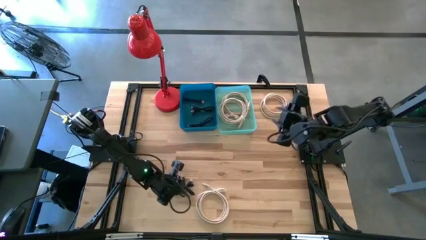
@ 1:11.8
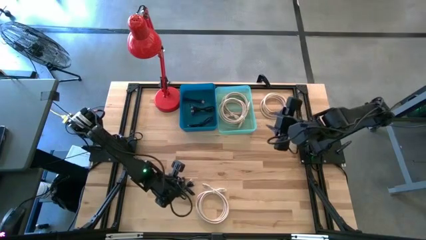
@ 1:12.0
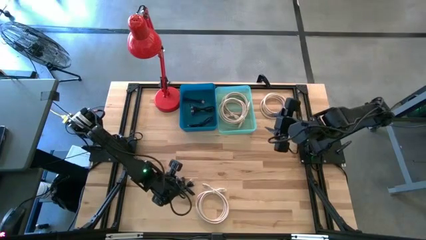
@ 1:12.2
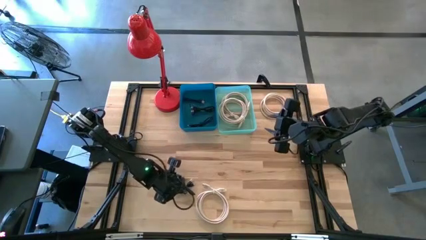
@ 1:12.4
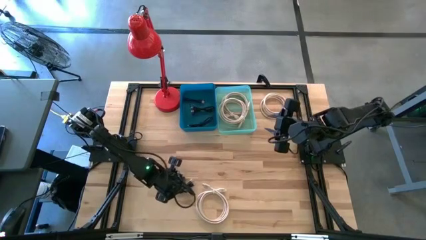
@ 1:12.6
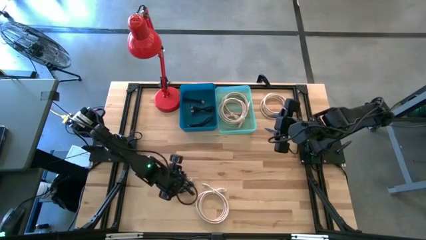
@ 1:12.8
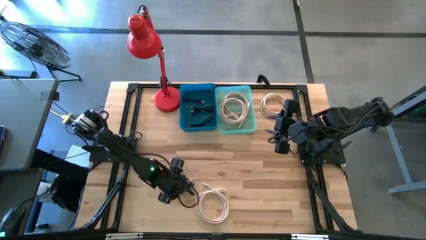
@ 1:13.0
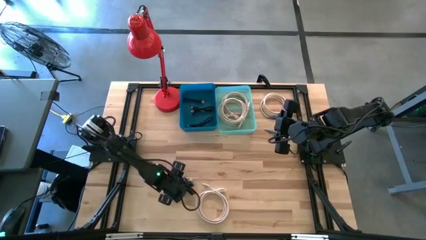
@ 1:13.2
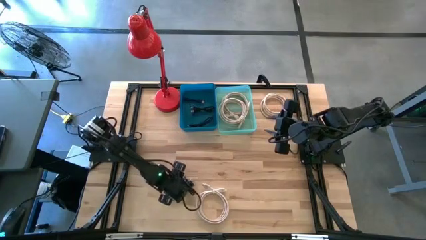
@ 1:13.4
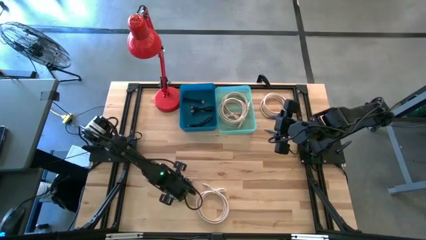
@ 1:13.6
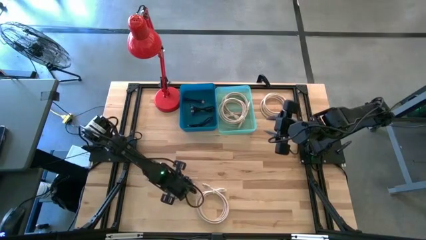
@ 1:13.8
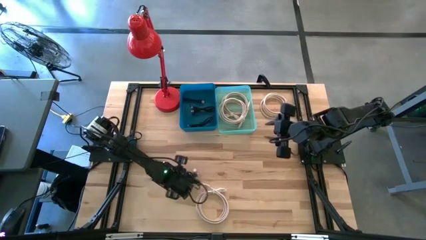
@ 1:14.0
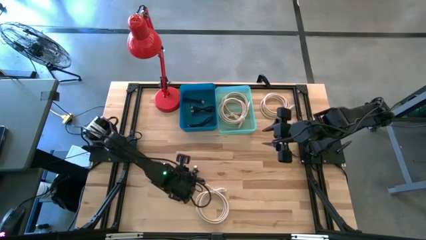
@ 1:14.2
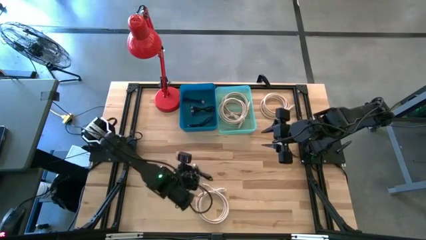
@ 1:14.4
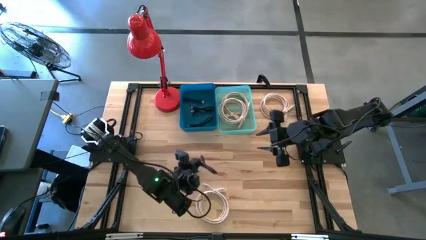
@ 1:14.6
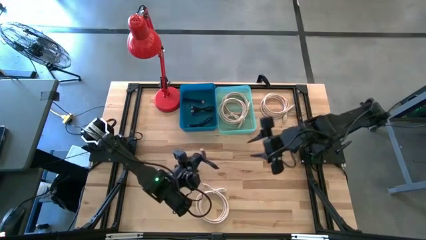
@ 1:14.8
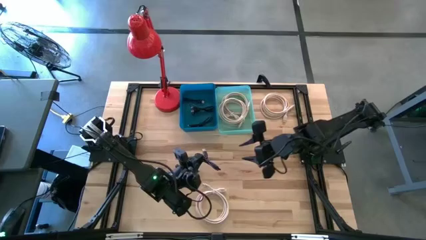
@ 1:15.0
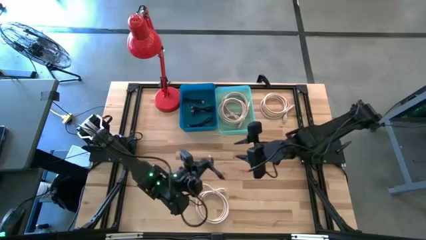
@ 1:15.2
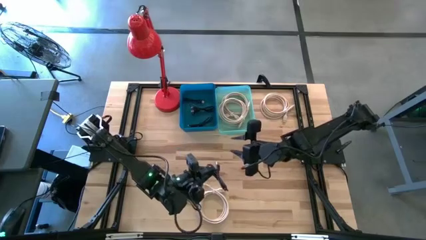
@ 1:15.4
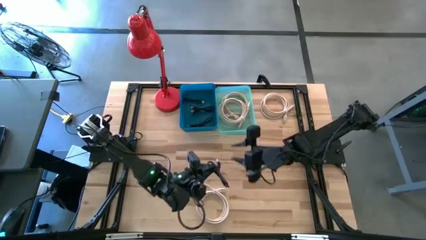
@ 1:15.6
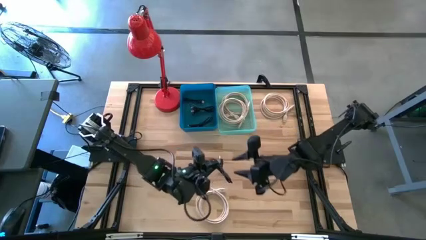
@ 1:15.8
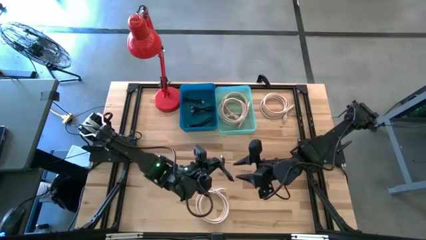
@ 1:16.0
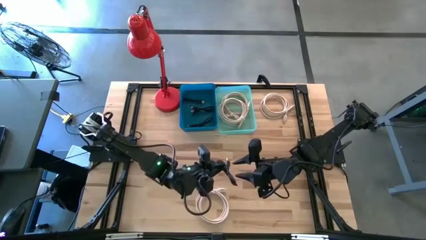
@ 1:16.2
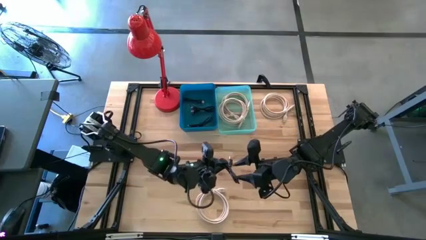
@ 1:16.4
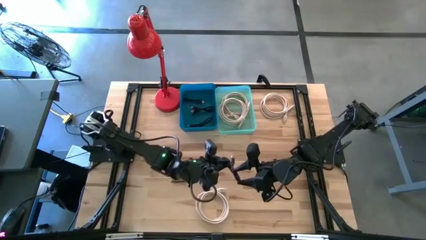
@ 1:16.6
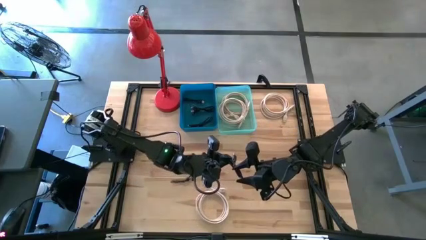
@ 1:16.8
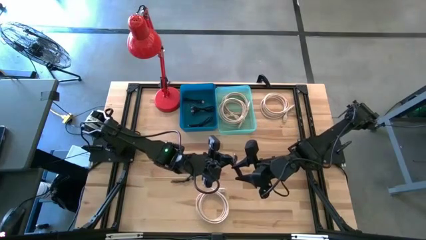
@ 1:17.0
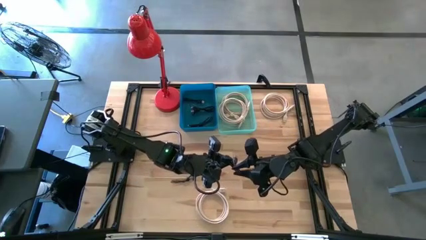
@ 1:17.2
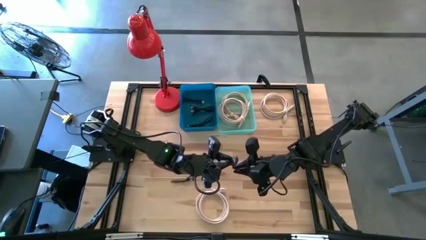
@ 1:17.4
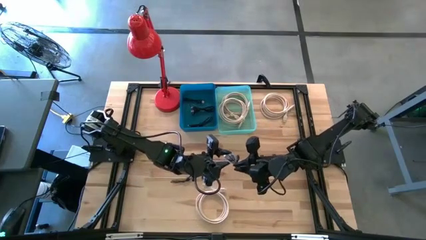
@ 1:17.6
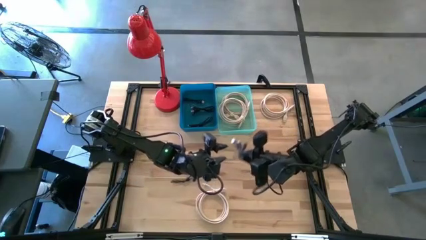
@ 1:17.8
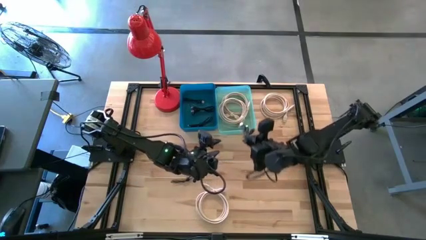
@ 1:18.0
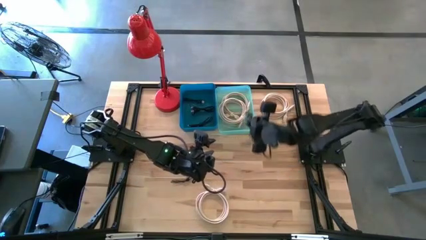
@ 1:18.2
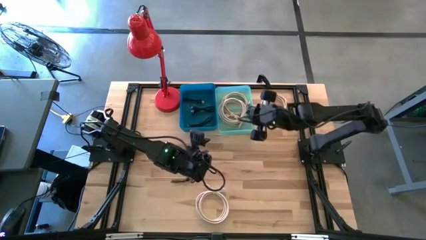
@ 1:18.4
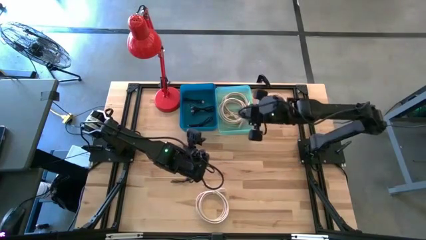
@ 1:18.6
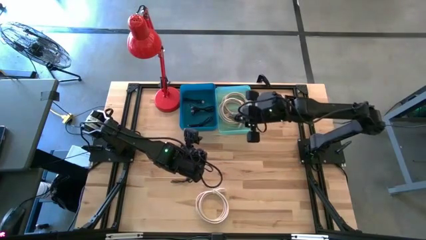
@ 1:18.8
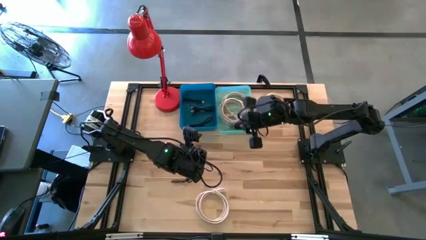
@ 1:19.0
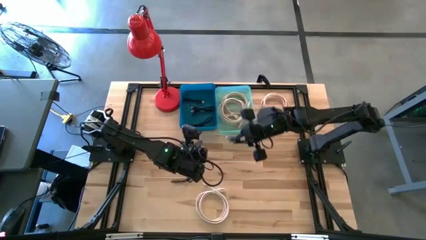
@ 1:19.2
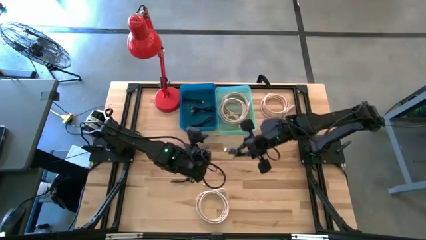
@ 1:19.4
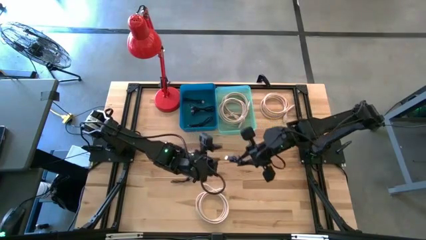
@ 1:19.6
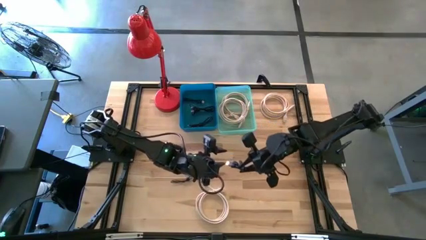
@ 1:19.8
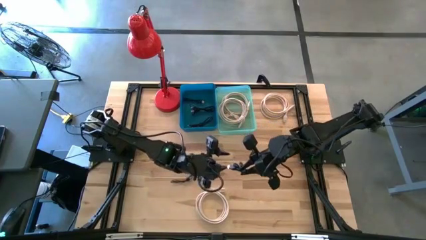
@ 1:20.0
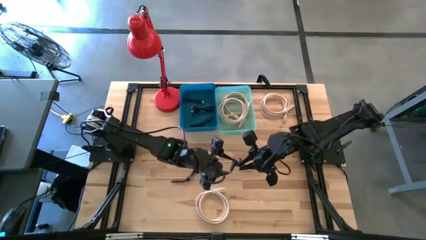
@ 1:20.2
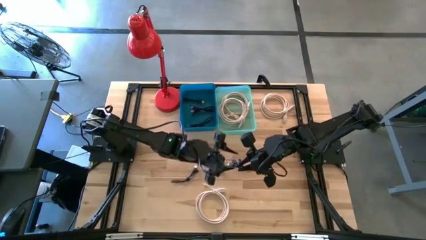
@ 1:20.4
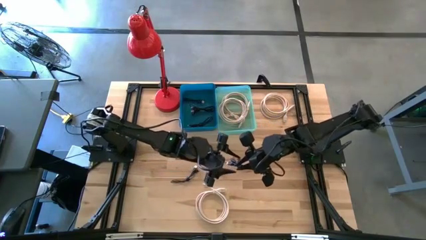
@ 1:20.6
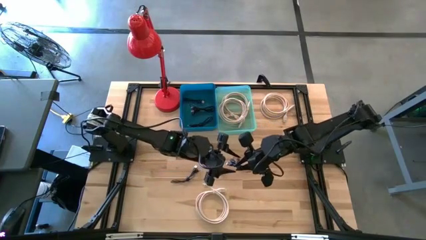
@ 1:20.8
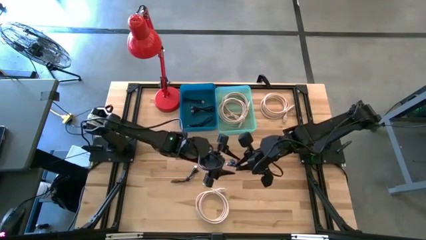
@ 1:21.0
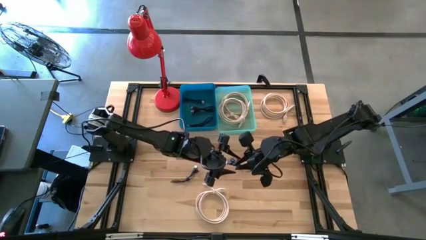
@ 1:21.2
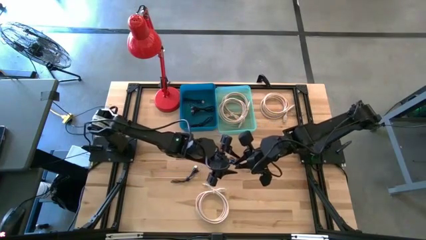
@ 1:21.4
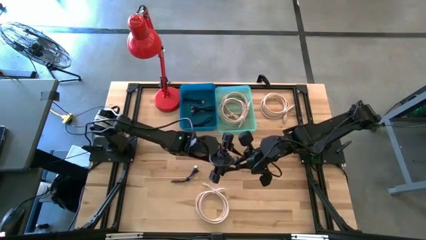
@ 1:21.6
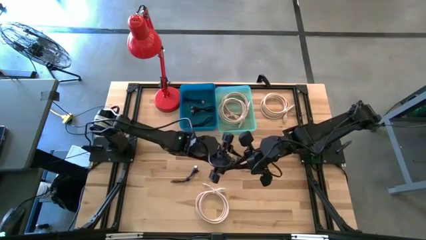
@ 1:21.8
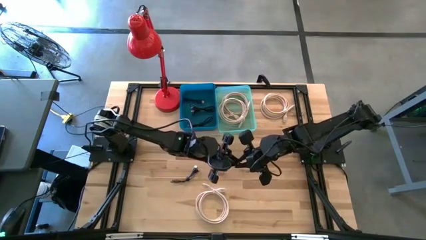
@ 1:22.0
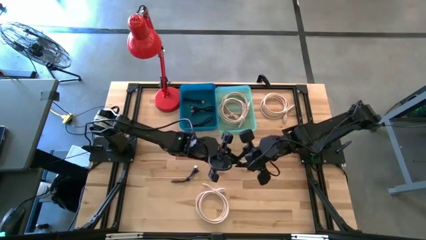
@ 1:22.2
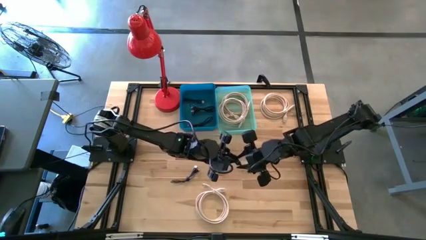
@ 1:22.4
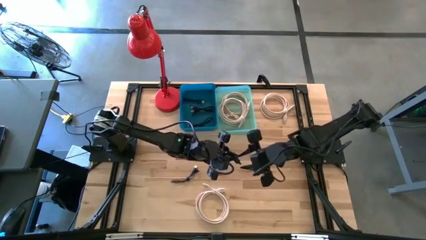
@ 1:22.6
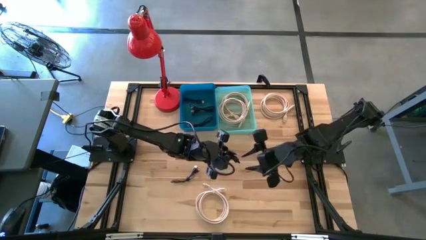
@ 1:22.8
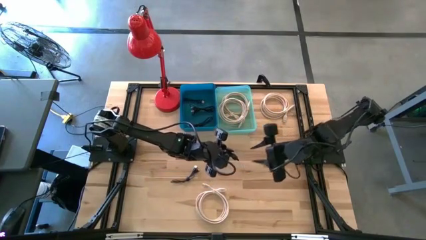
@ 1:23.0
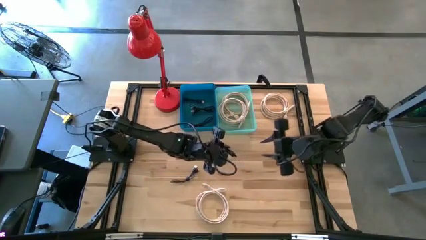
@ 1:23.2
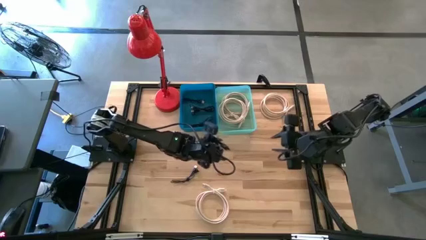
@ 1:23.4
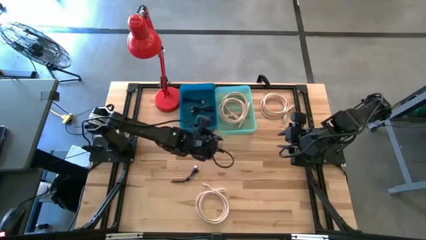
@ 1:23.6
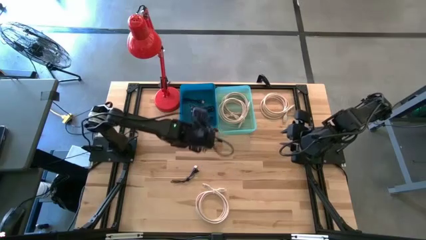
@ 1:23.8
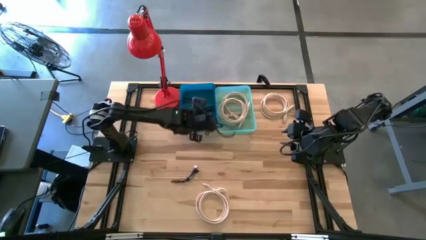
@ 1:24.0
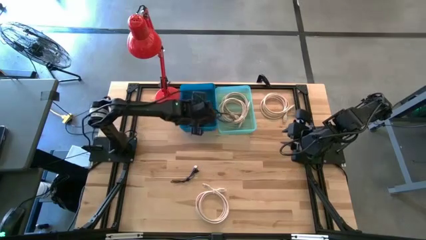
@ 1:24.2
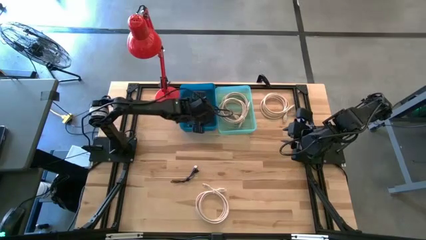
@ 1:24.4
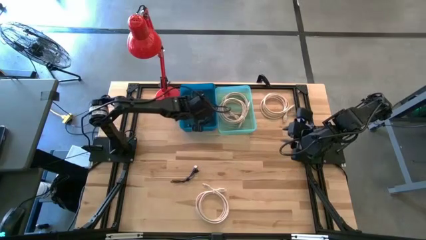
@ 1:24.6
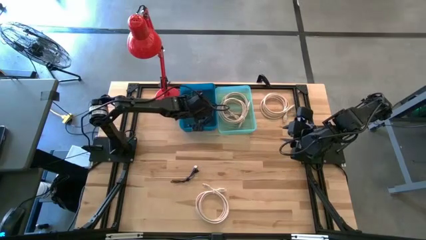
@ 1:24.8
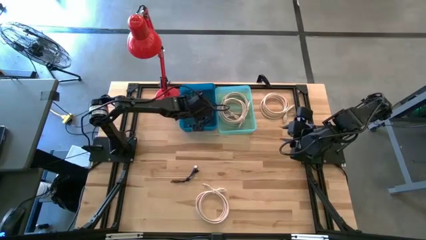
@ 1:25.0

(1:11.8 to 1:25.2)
Task: Pick & Place USB Port
Put the black USB cable into the blue bin

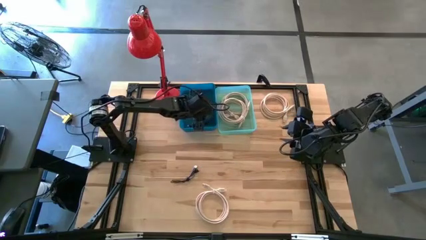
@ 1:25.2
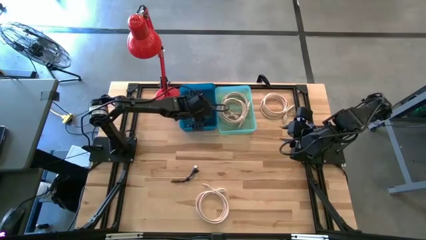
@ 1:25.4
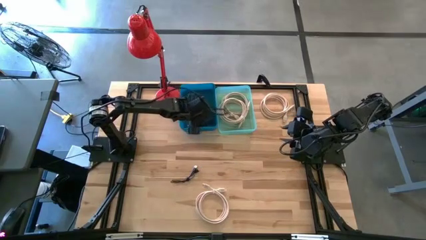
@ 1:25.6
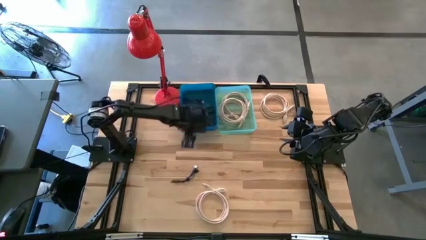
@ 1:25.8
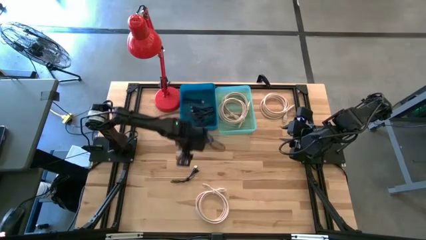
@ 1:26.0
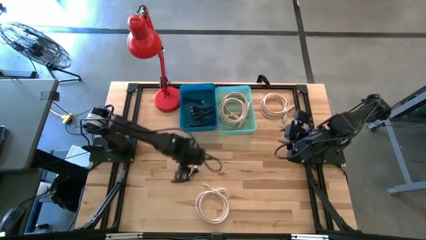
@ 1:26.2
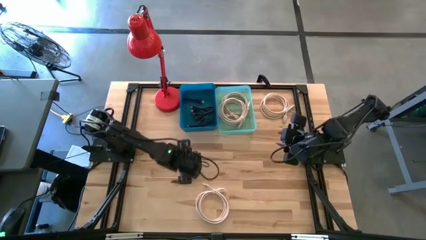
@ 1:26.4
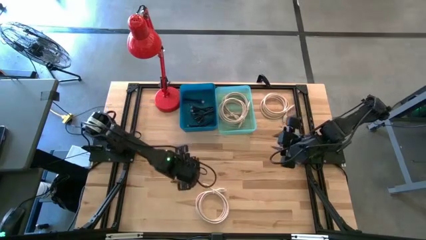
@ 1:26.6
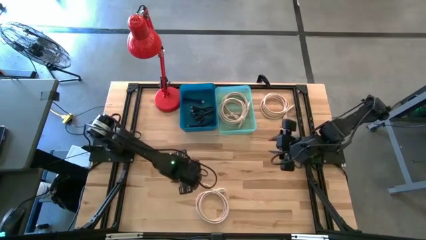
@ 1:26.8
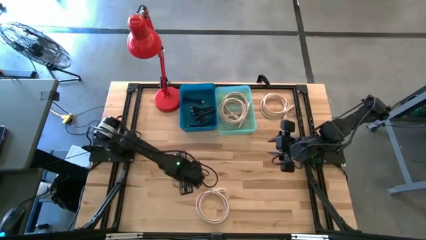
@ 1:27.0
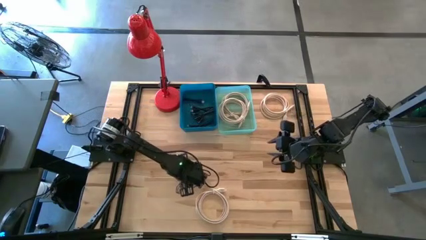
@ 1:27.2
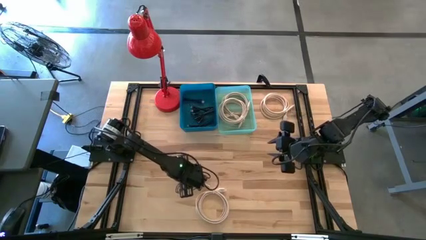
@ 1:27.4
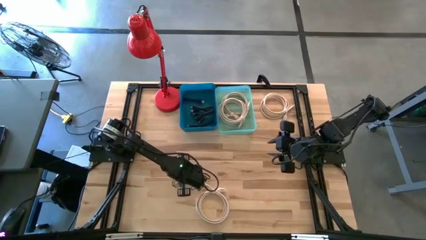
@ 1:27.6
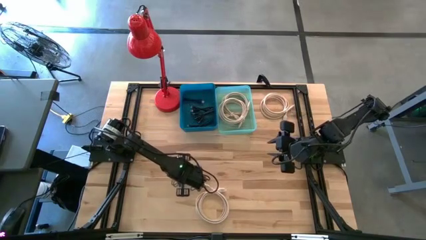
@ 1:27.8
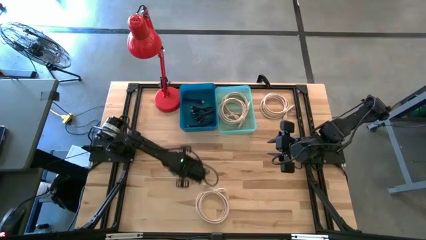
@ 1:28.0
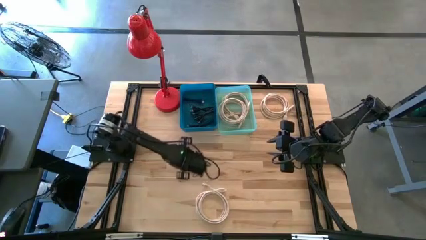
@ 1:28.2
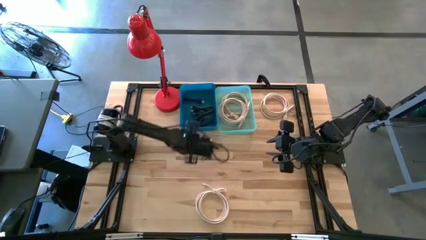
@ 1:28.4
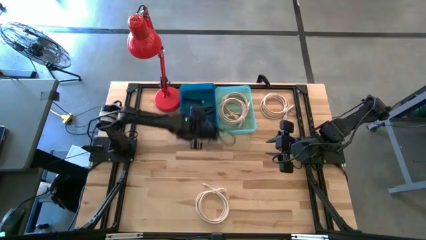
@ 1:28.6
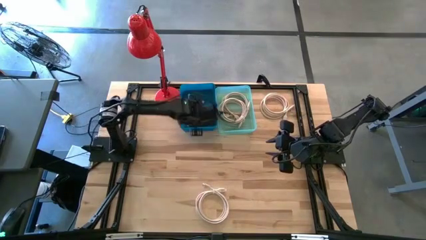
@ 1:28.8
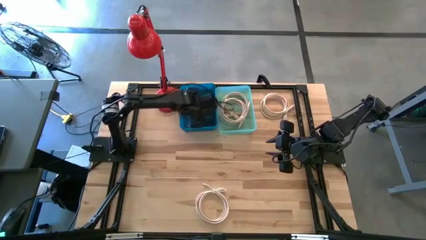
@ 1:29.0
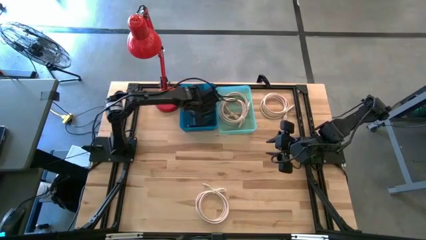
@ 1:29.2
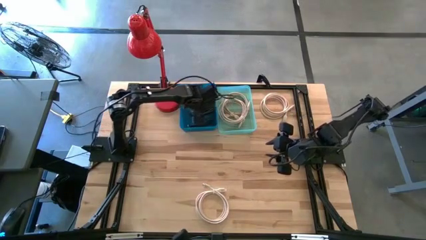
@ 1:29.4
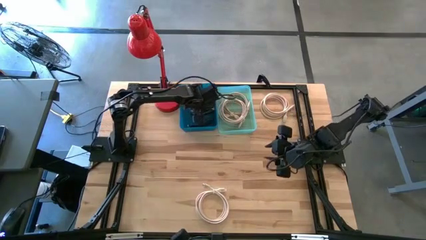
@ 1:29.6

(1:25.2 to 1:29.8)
Put the black USB cable into the blue bin
